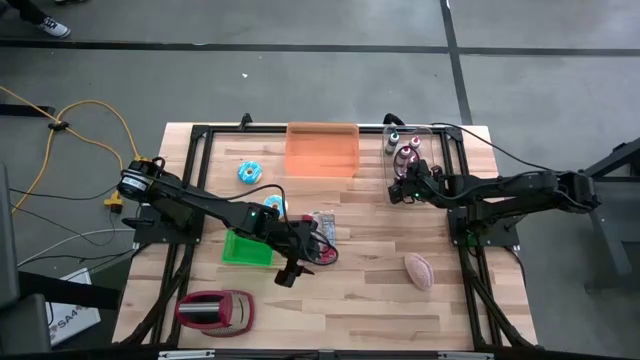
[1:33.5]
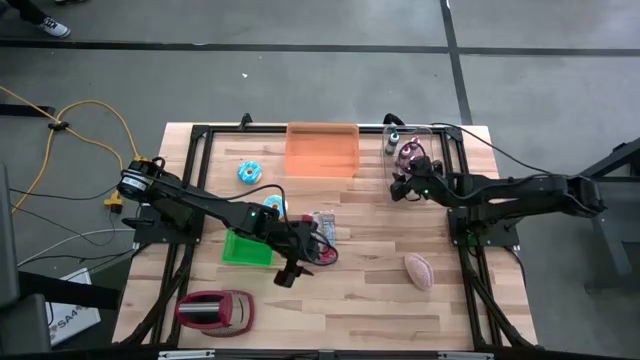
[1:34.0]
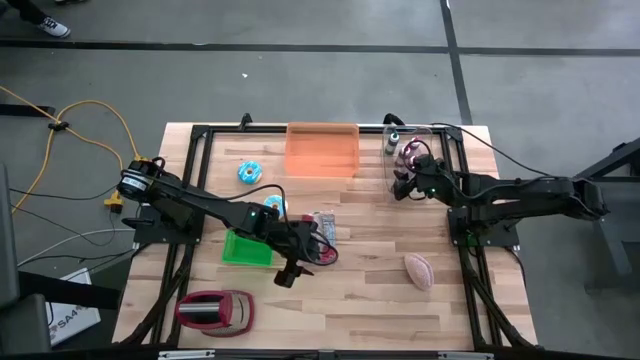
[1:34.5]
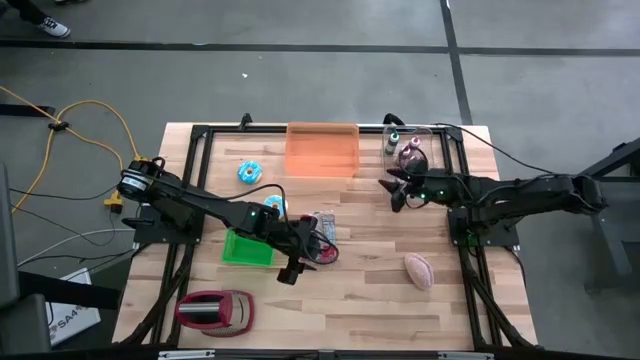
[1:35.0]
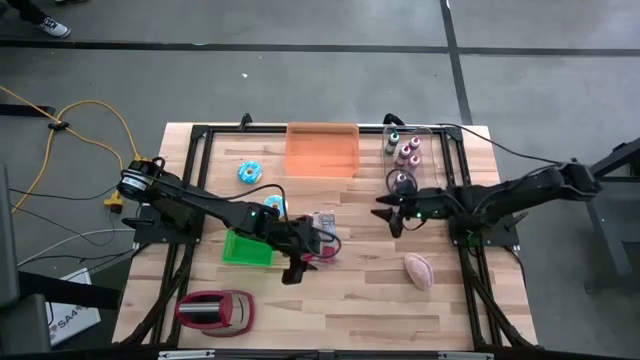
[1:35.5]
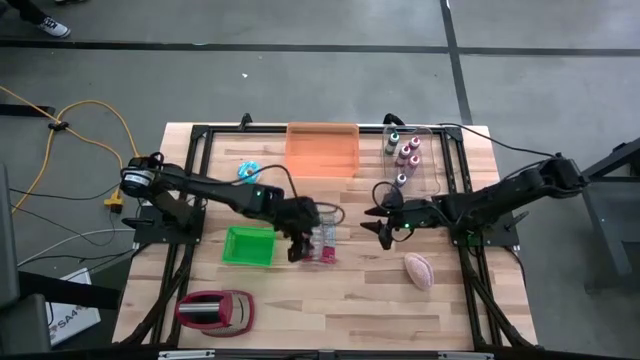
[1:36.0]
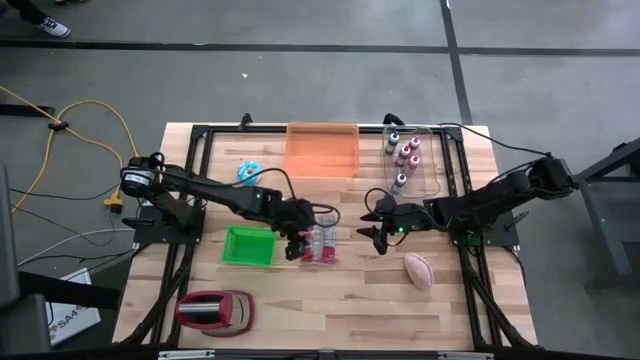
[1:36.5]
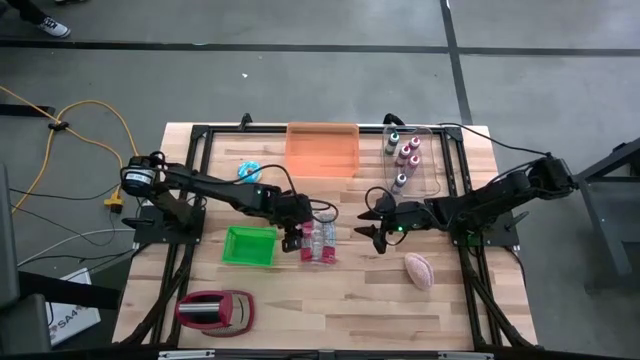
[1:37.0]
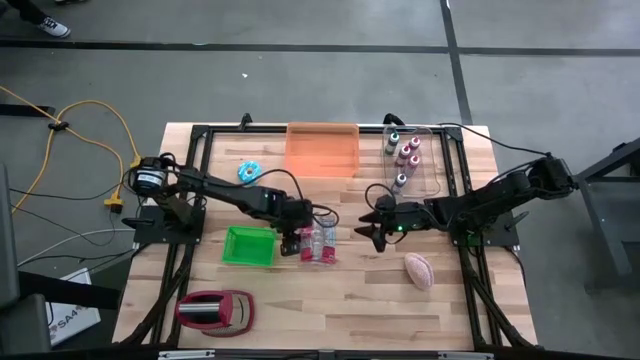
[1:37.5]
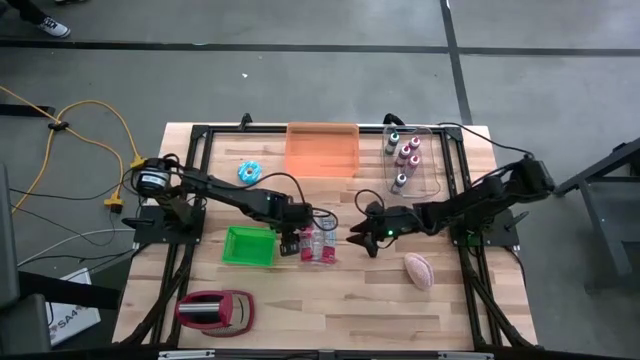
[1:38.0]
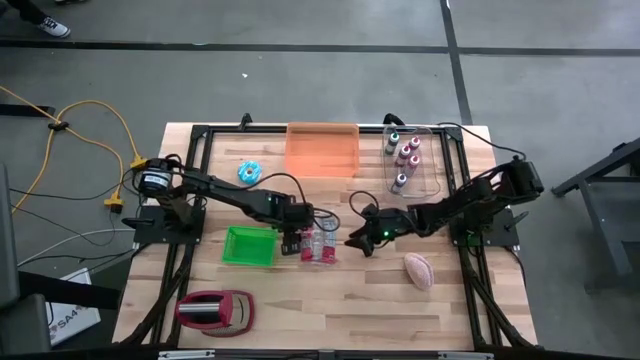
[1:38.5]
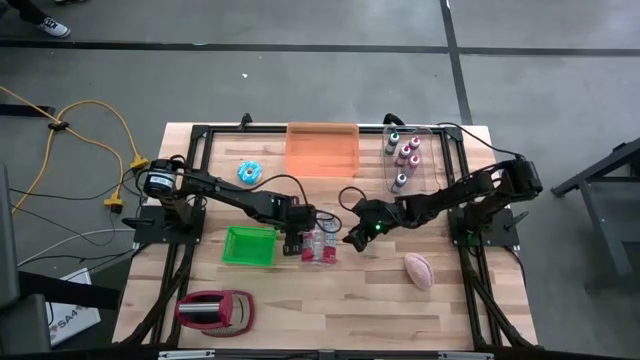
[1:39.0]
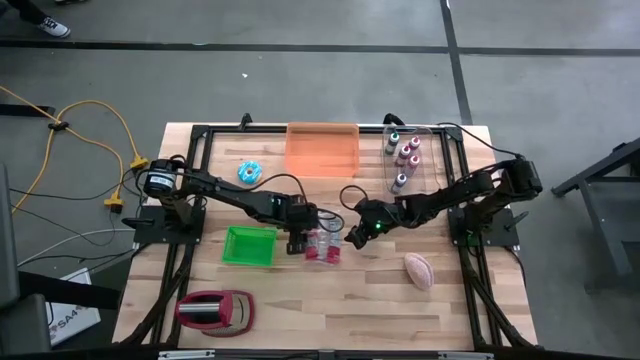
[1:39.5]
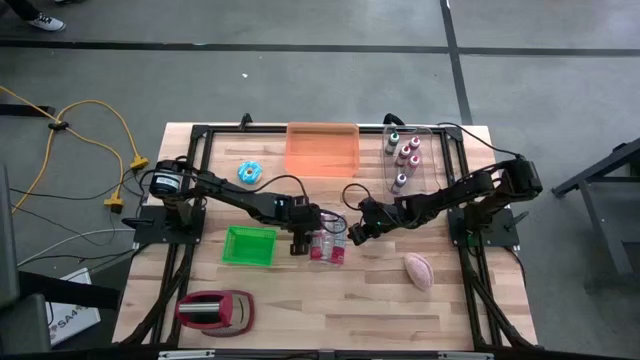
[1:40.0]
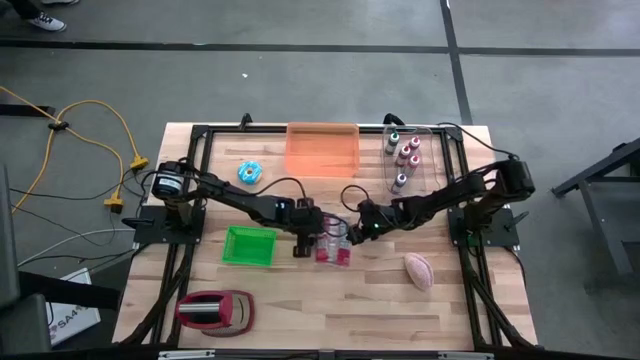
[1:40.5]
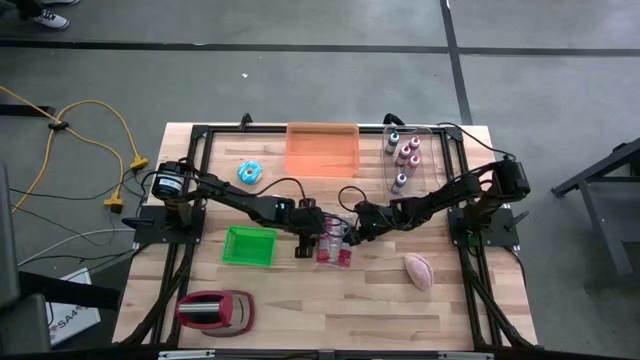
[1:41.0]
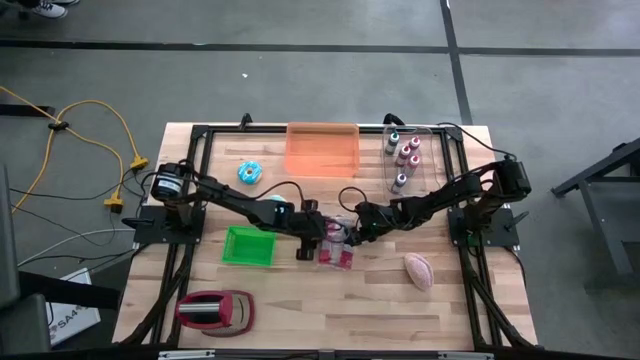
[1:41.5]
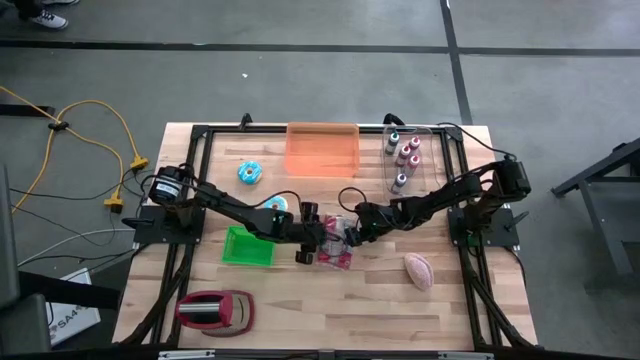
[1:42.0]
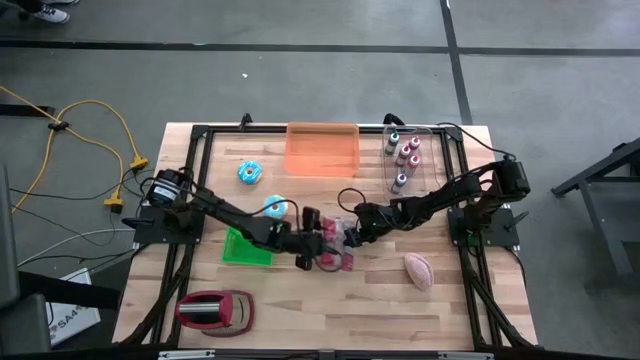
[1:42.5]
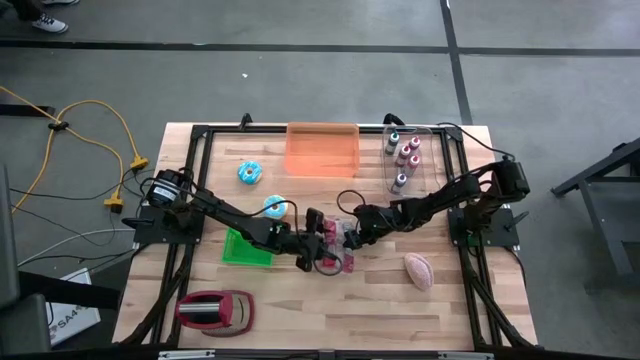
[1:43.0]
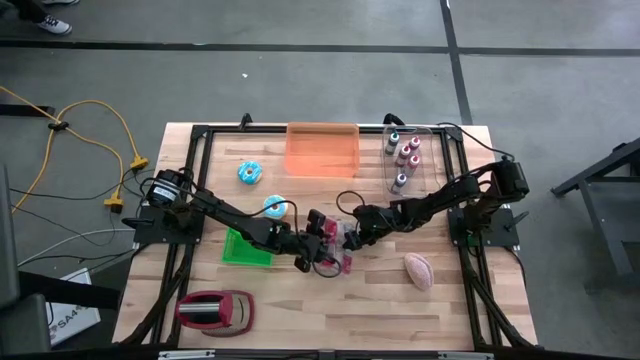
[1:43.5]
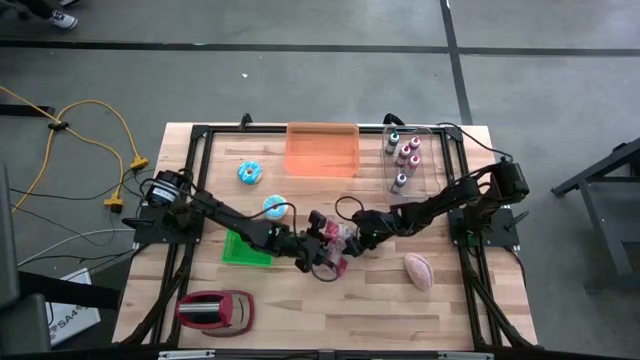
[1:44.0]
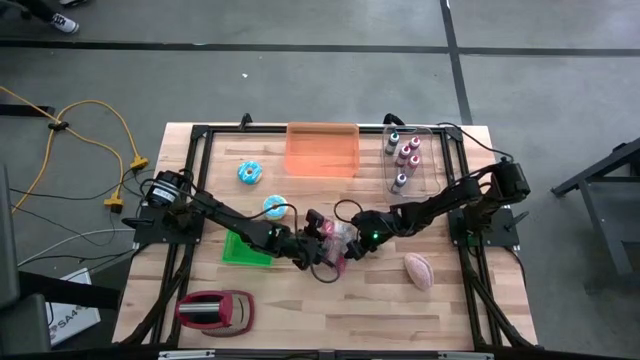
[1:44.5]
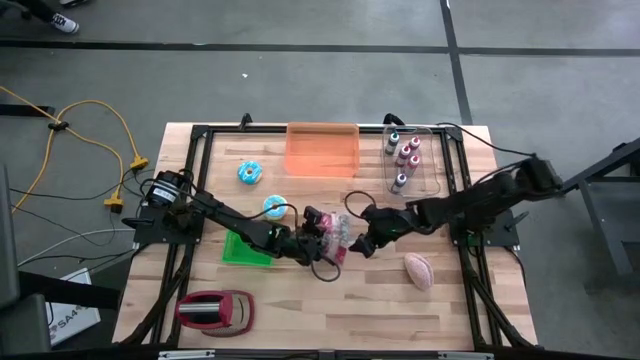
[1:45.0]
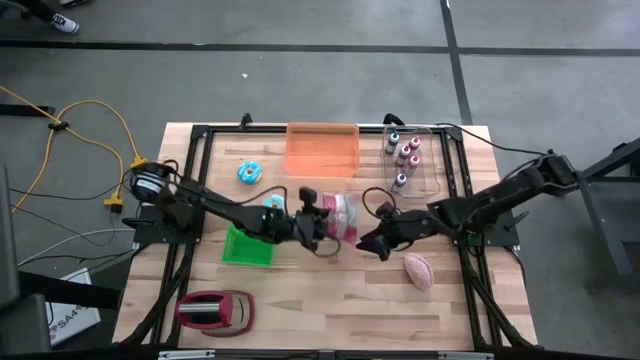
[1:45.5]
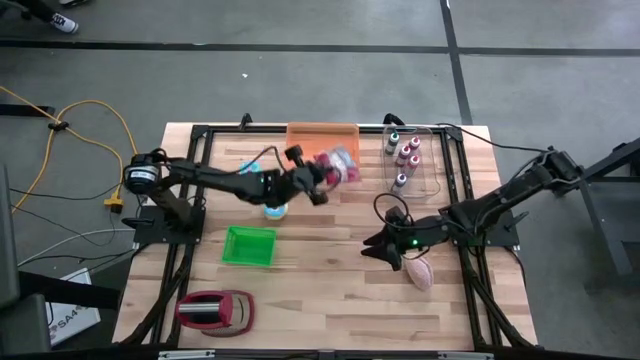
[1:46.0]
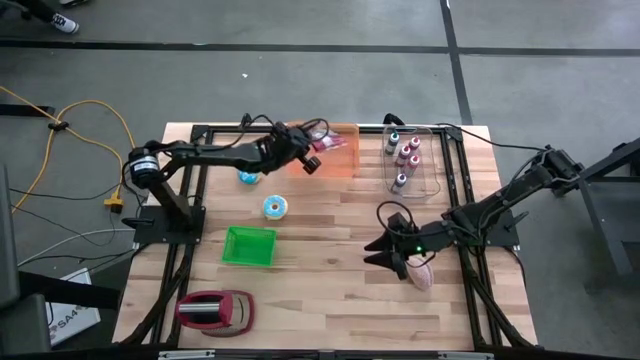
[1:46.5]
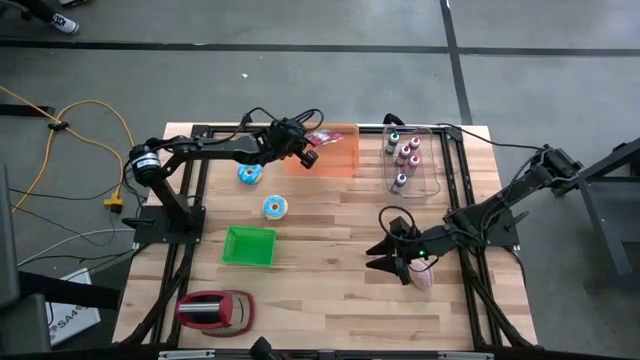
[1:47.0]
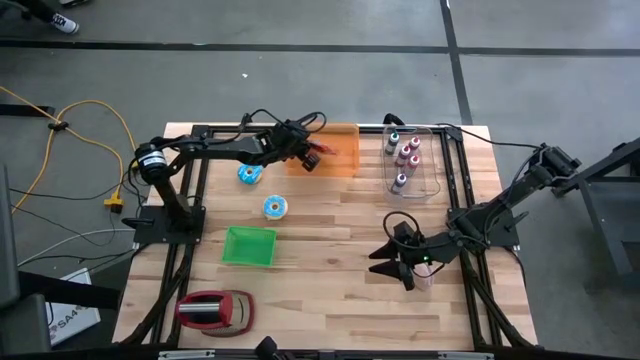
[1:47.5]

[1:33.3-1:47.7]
Put the popcorn bag into the orange bin
